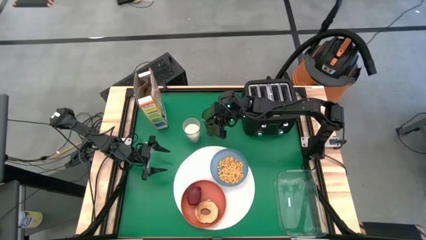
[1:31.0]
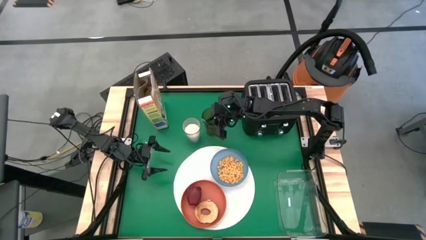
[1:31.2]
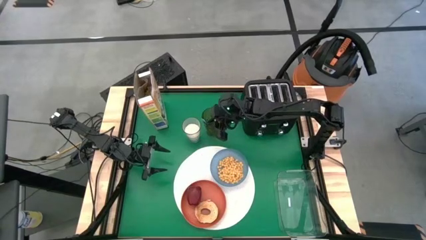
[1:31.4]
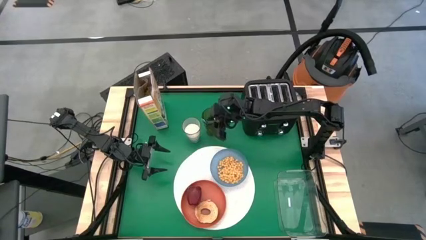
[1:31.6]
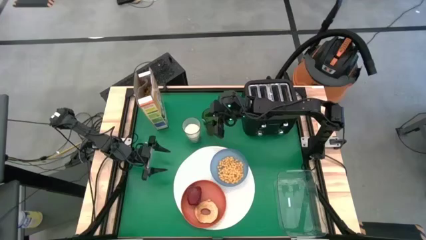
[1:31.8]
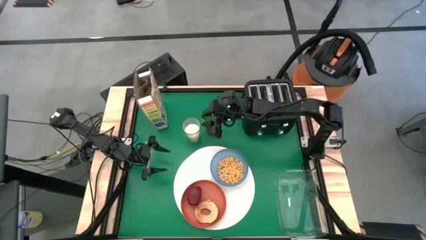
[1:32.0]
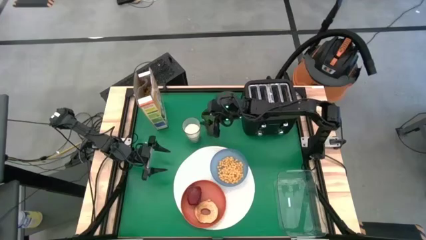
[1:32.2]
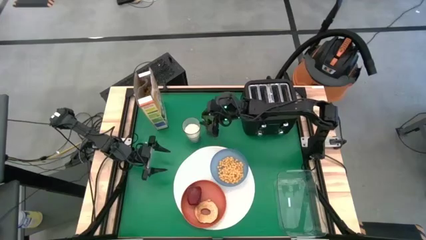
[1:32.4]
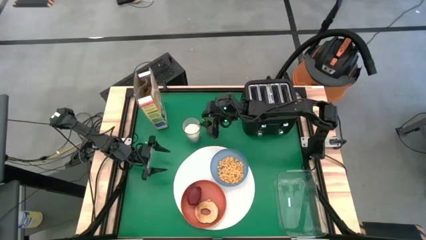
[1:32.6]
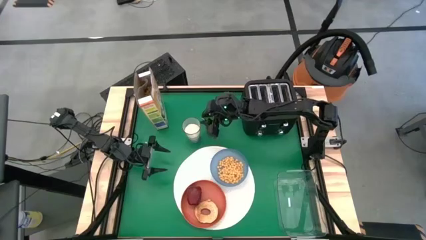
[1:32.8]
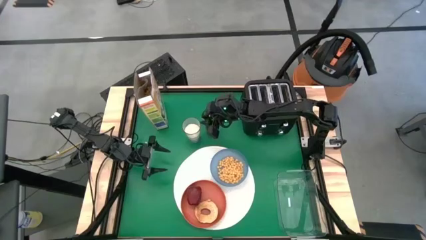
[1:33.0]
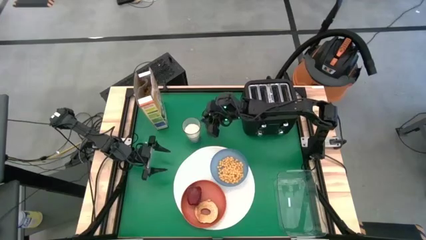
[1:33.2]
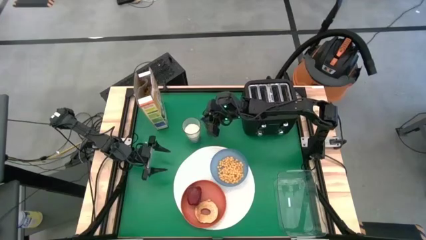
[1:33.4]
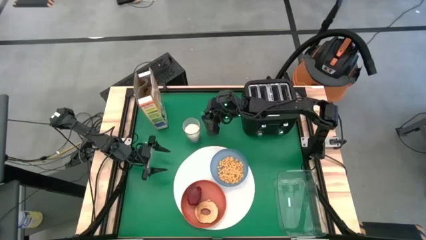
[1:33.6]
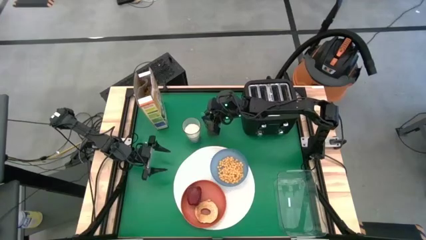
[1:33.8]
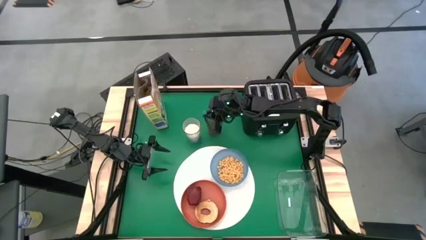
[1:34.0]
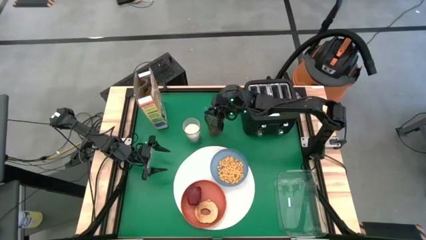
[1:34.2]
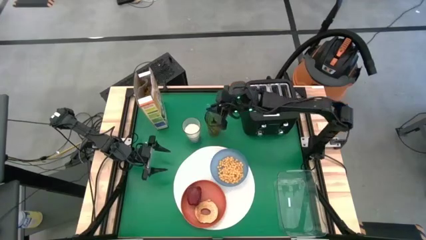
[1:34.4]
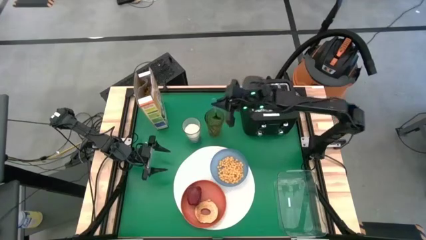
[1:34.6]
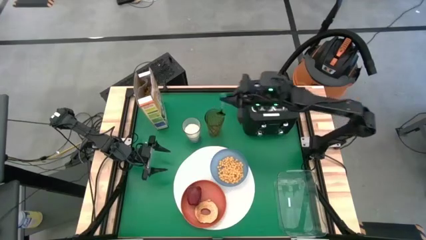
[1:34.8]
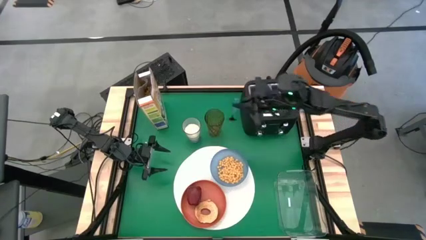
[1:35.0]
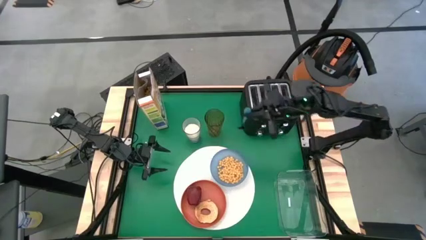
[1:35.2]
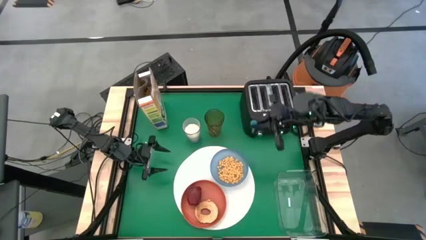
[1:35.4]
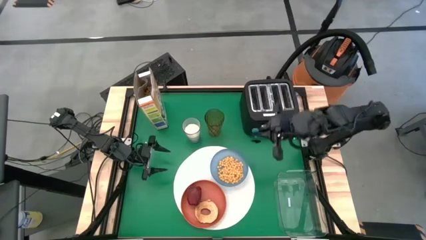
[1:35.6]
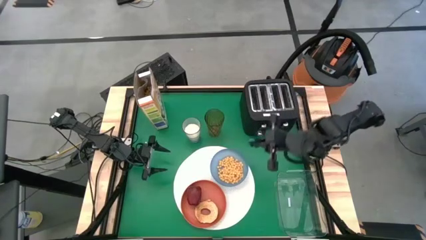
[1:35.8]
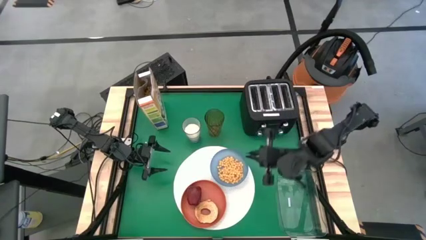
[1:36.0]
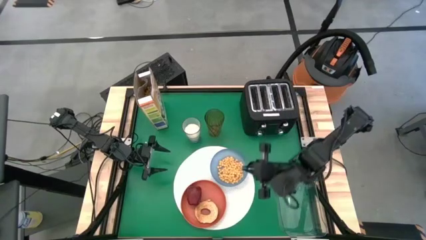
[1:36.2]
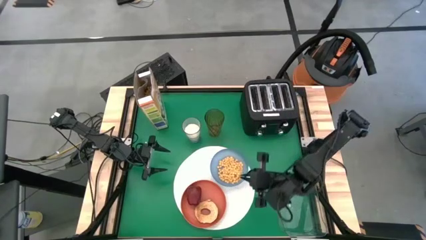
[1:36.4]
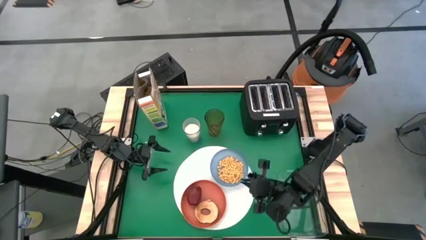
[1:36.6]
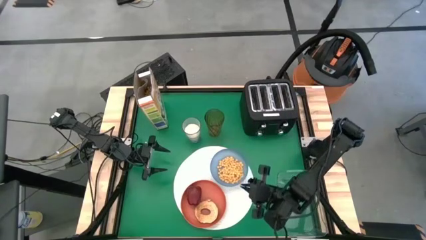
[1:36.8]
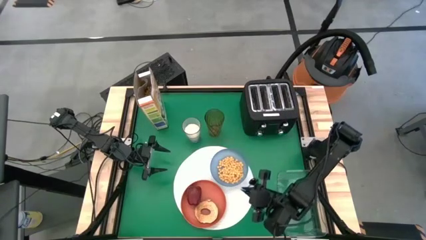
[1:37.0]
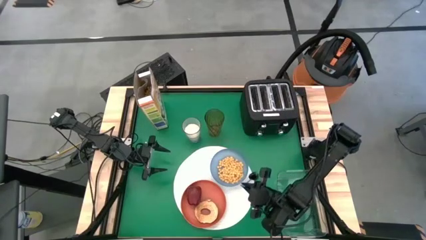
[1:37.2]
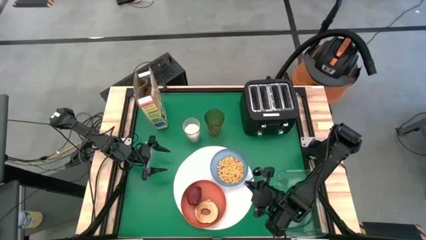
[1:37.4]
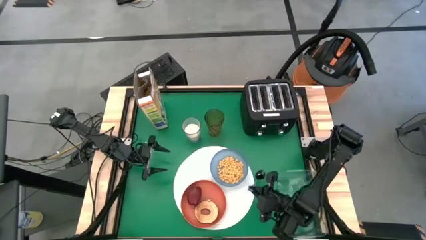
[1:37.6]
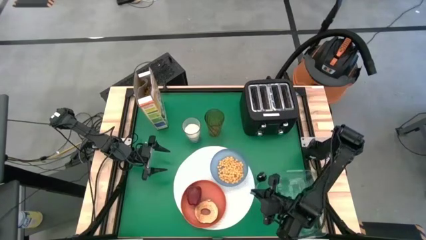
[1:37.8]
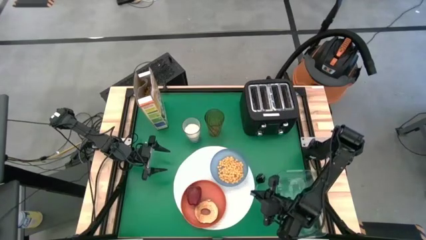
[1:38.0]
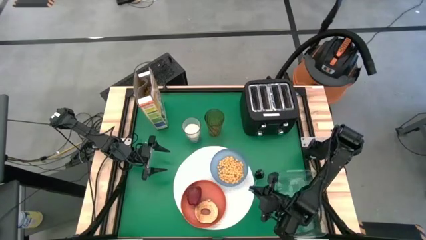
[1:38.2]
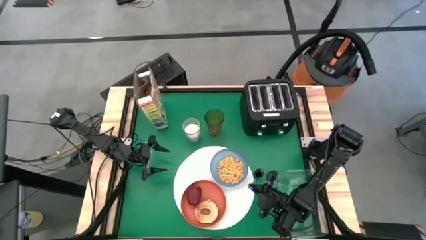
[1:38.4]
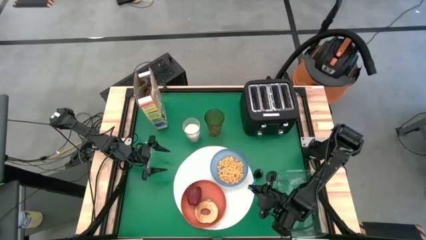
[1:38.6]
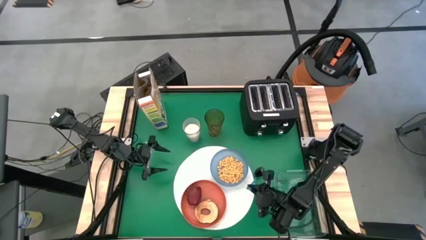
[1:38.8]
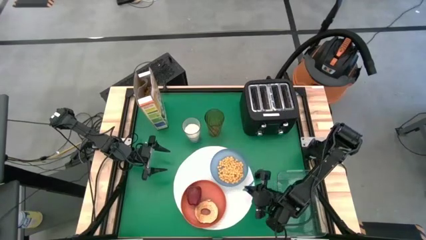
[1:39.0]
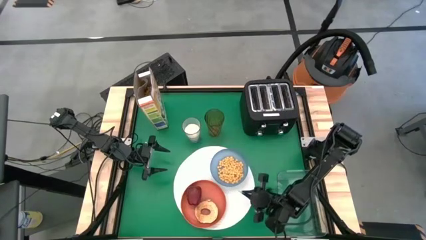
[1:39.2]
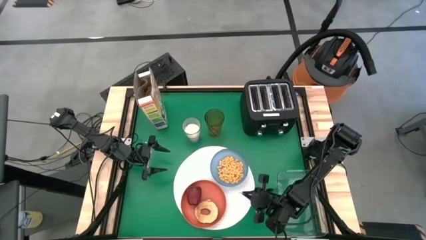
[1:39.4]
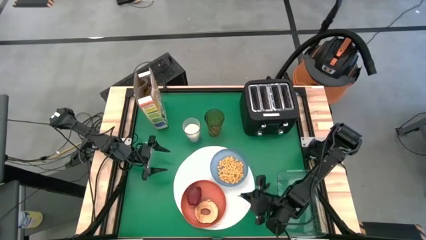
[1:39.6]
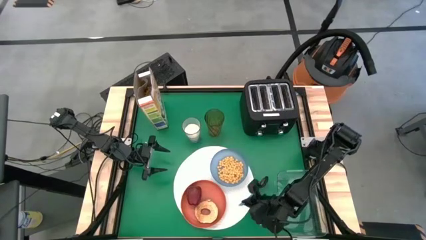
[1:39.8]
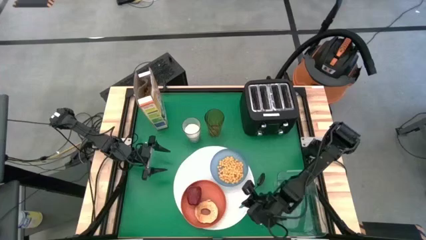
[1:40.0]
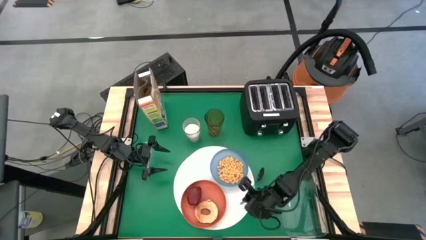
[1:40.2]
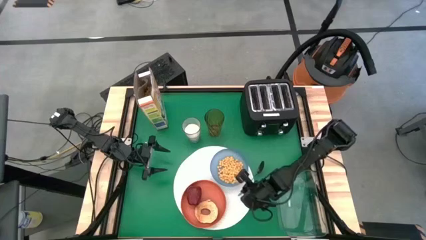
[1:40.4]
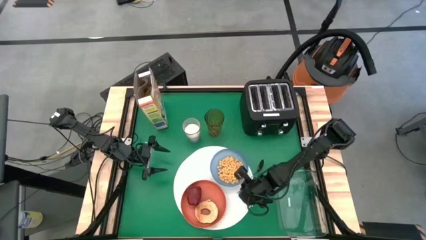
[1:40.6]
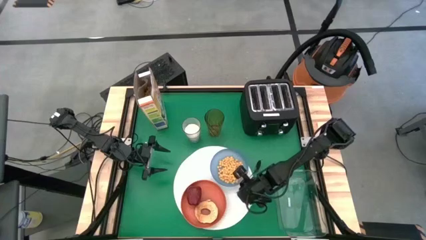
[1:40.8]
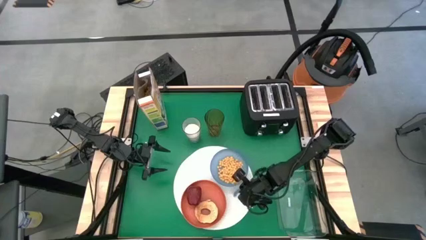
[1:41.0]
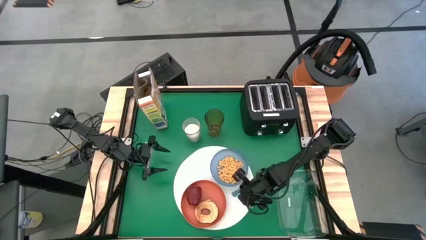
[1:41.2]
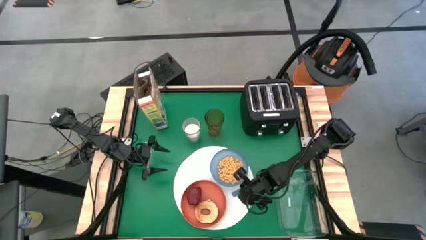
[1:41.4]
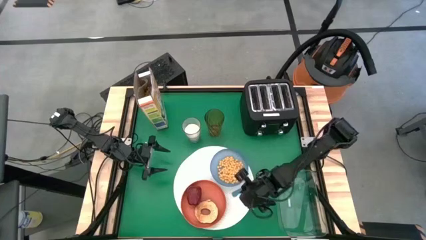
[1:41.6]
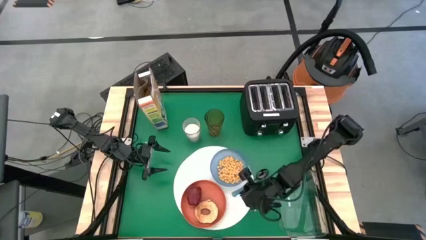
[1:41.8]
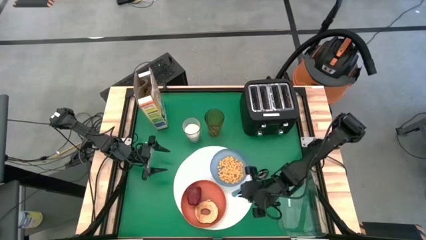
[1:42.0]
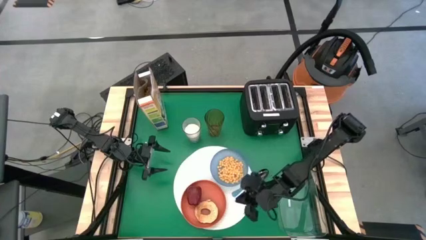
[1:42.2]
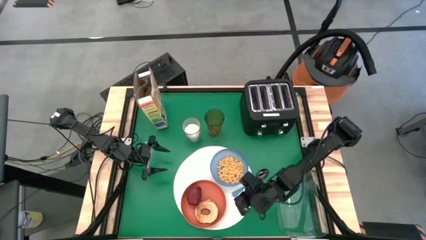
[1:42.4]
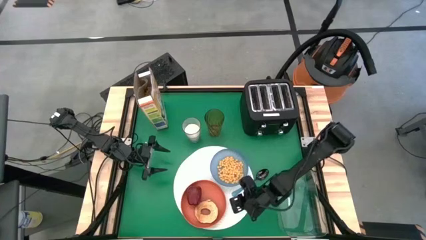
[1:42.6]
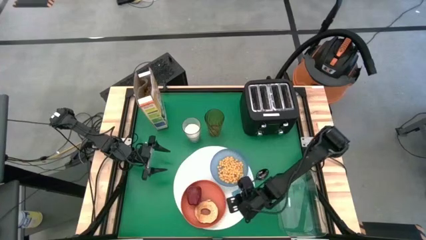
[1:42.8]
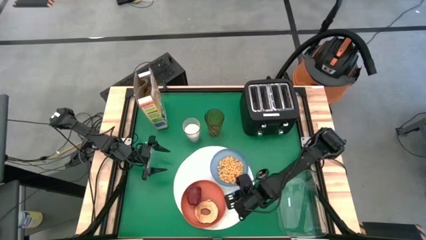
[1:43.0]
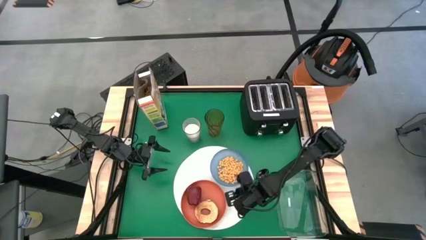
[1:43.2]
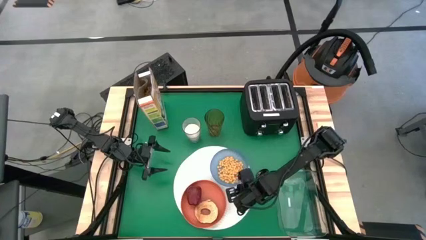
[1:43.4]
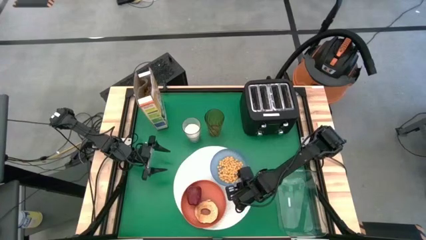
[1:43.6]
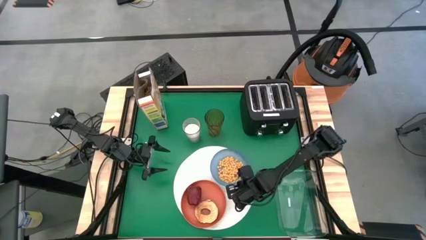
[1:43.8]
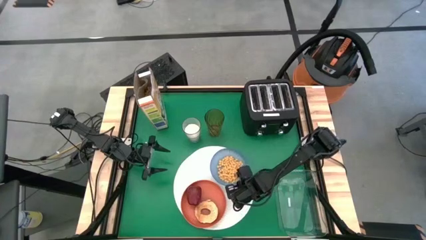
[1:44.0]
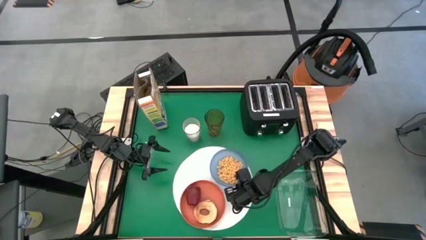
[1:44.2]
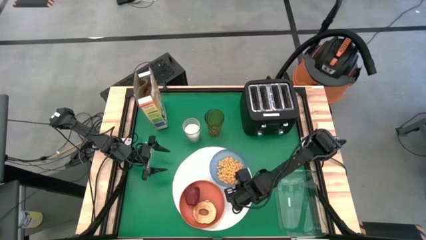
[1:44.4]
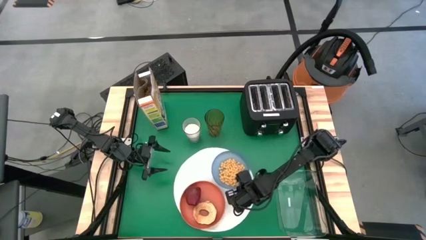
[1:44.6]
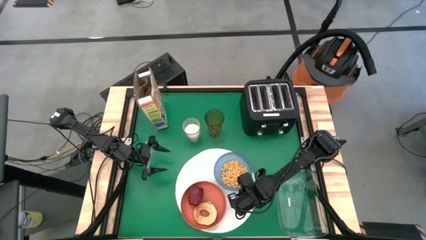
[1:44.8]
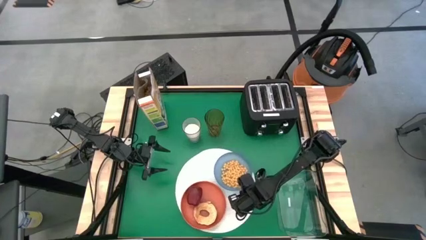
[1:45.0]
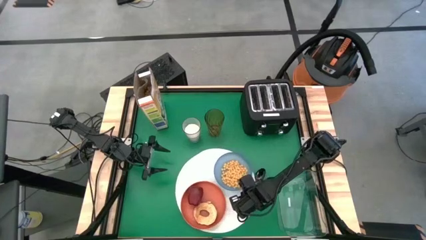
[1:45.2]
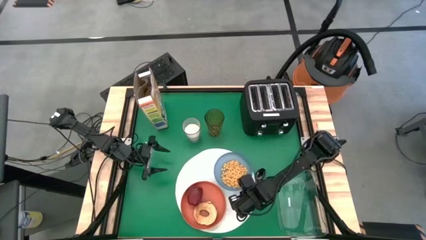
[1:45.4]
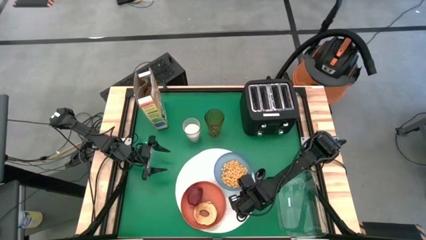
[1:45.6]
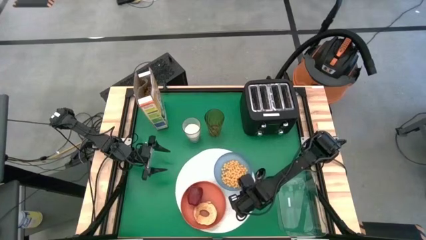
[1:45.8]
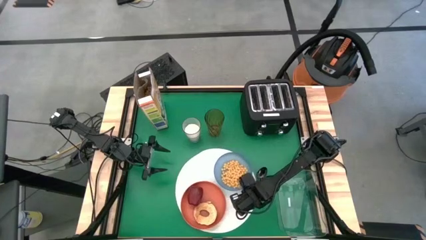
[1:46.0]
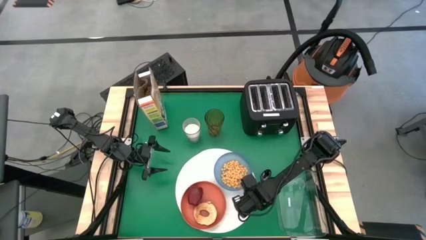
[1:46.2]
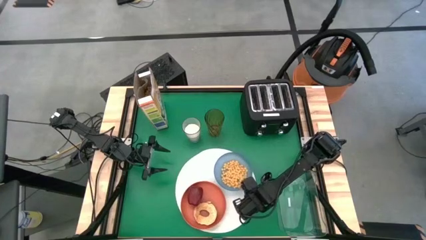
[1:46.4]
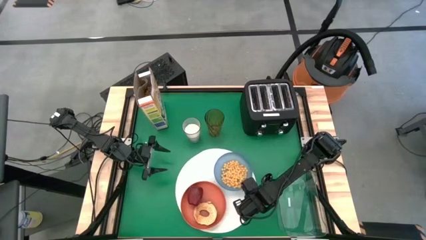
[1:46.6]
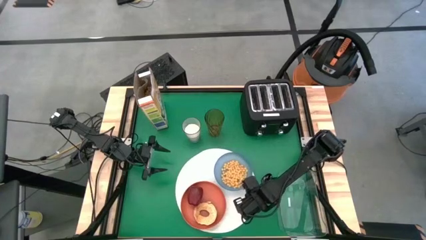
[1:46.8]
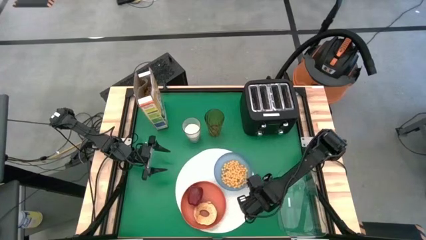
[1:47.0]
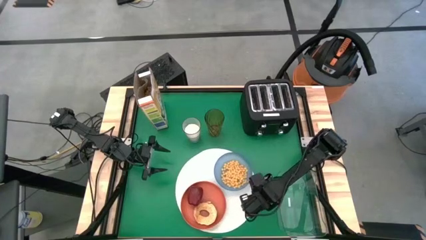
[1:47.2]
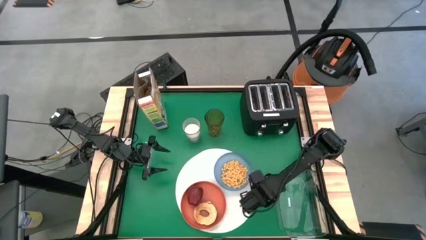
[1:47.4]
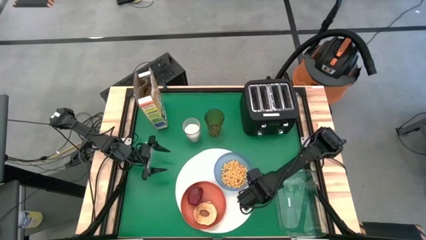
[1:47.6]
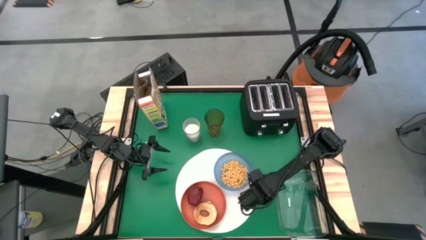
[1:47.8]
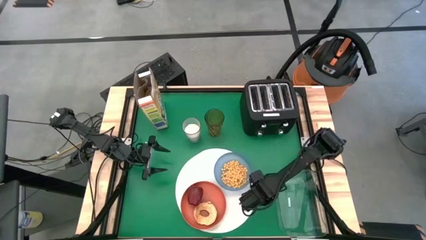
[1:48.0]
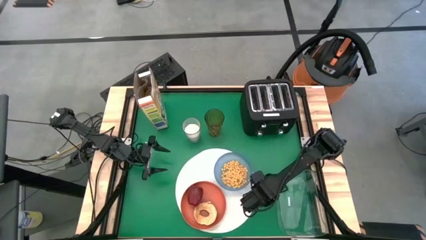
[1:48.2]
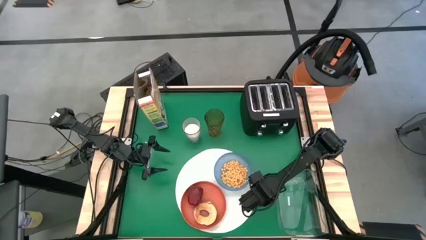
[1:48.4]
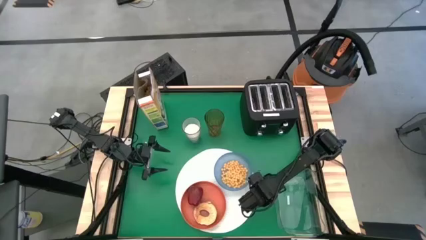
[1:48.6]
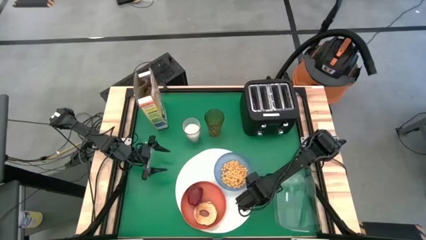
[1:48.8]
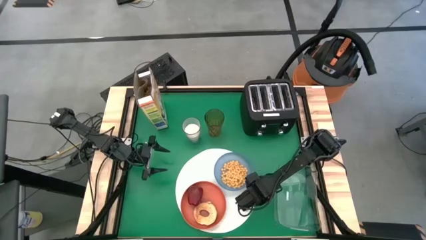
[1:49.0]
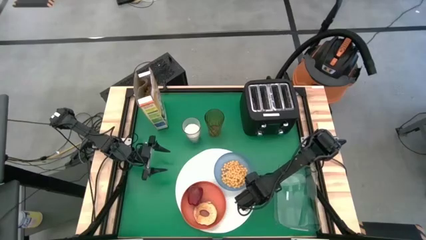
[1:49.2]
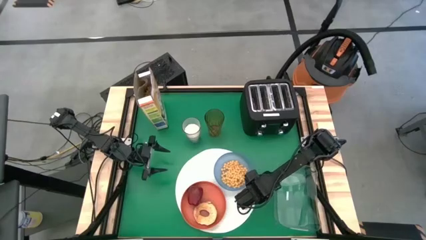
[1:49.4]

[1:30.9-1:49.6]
Task: Arrange a breakfast setting
Put the blue spoon to the right of the blue bowl on the white placemat
